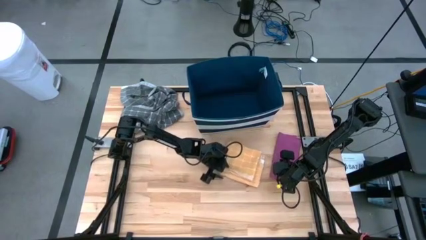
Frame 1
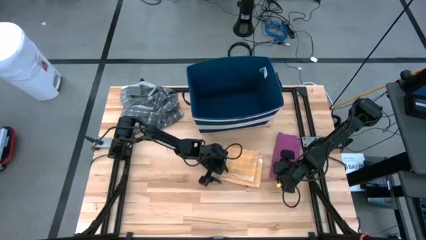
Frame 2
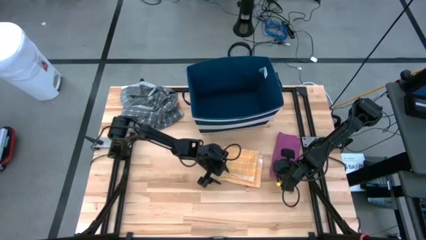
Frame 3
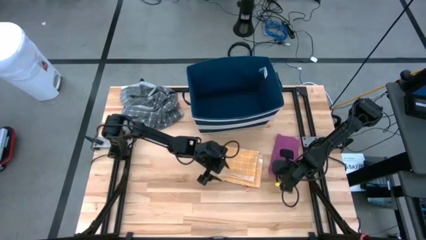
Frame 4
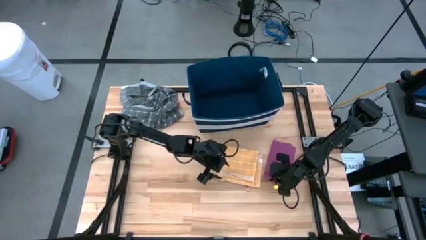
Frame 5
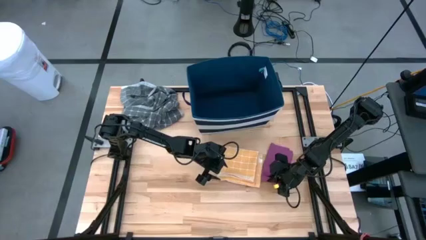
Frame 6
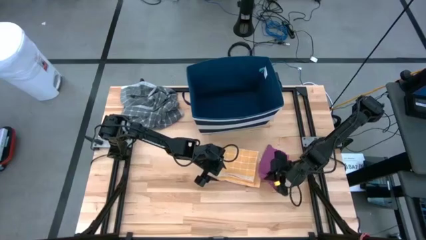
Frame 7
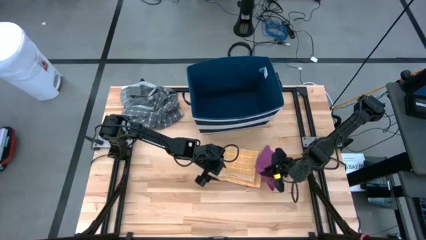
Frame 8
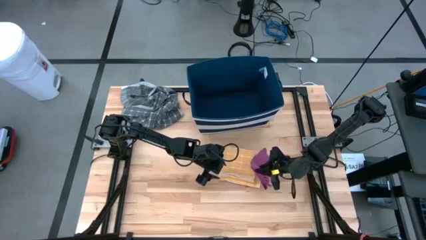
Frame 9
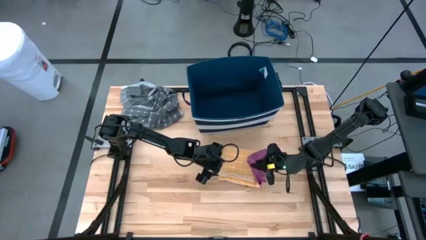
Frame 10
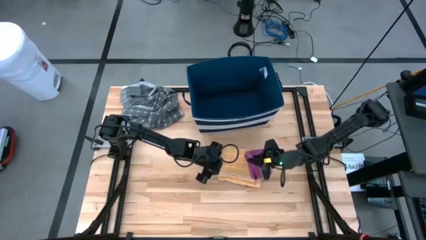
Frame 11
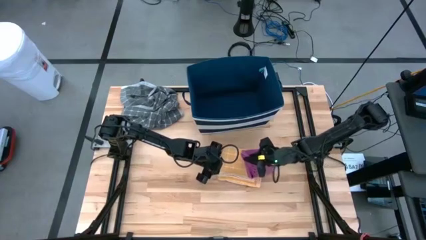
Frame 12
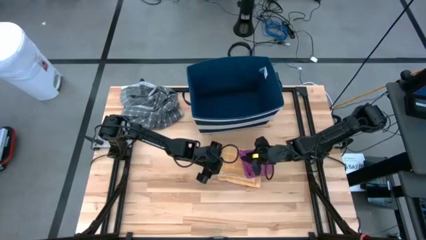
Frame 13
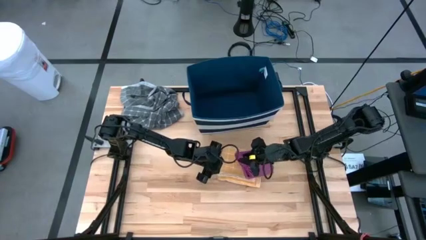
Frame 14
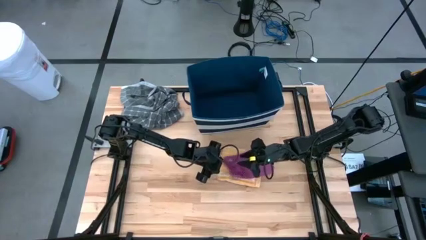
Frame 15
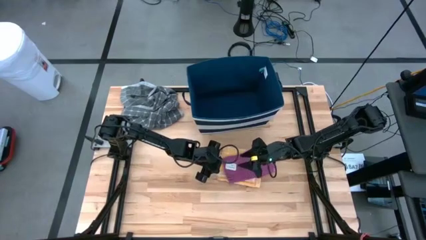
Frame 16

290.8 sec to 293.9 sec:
Task: Fold towel
Stack the purple towel on the yellow towel

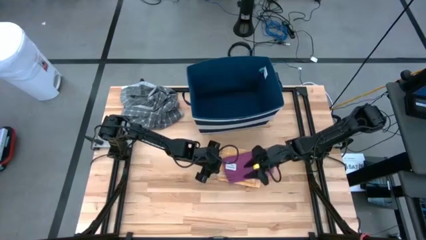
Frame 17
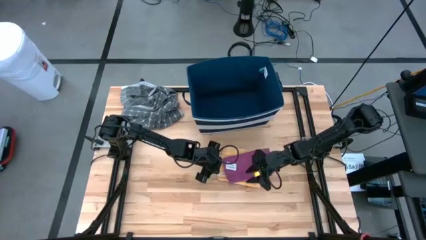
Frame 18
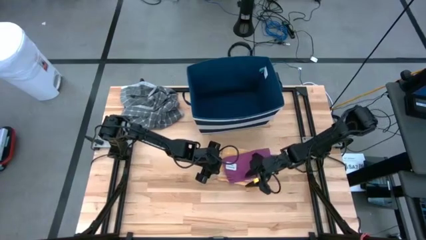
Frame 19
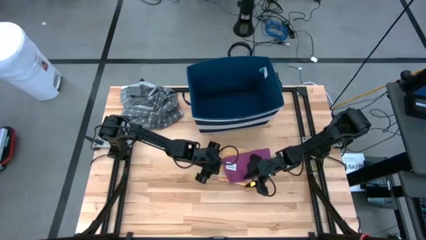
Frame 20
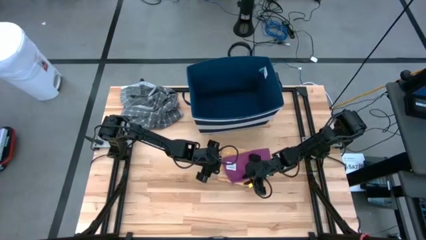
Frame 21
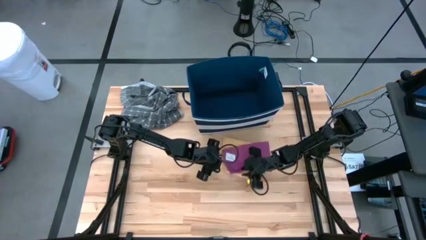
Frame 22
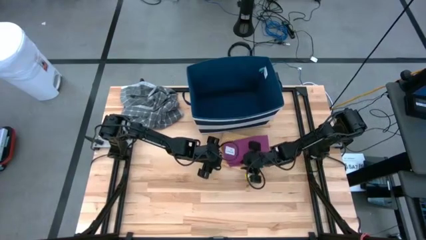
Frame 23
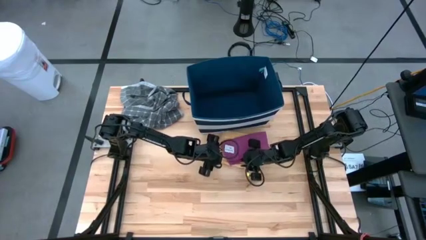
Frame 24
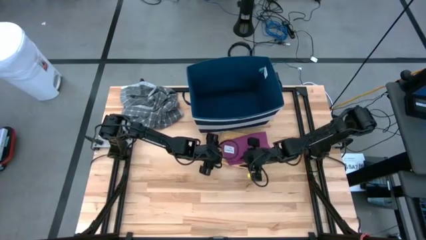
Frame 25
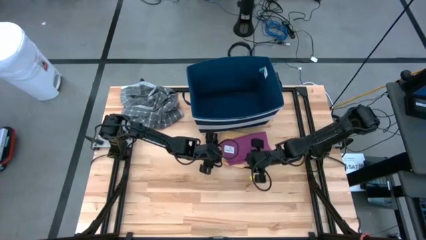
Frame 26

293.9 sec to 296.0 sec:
Move the stacked towels to the top

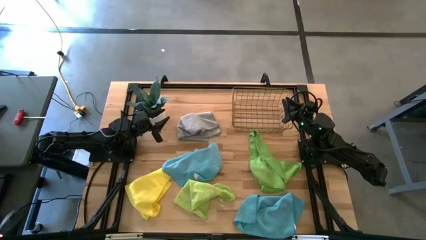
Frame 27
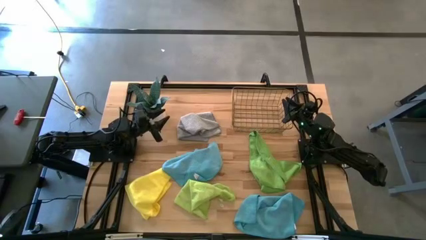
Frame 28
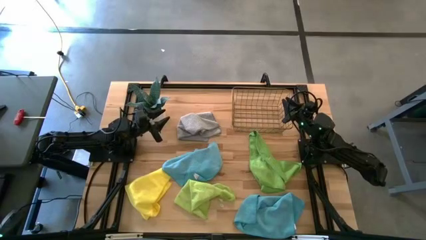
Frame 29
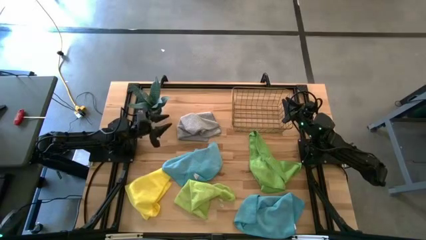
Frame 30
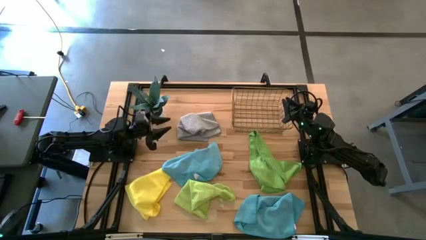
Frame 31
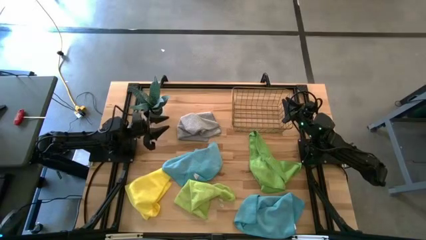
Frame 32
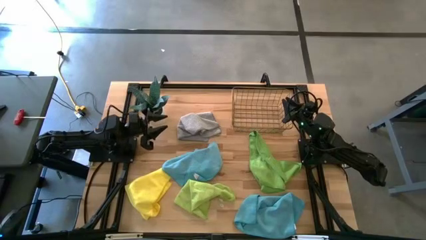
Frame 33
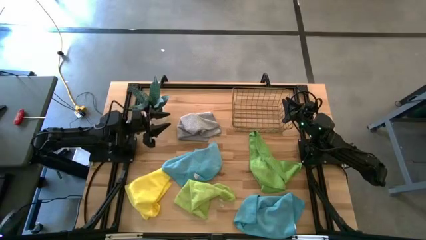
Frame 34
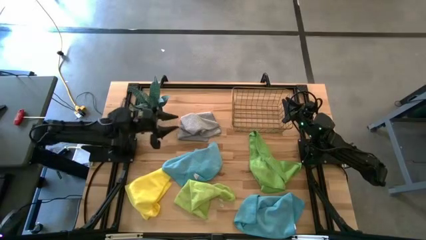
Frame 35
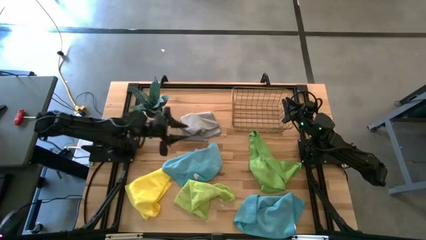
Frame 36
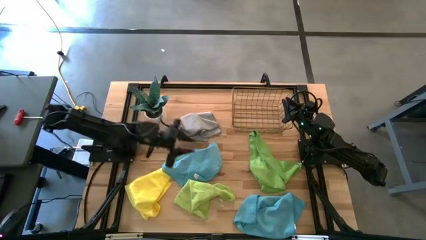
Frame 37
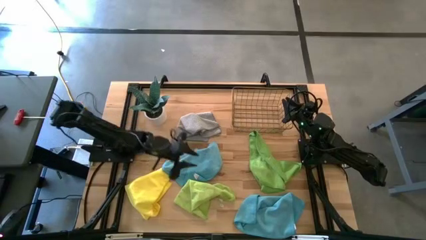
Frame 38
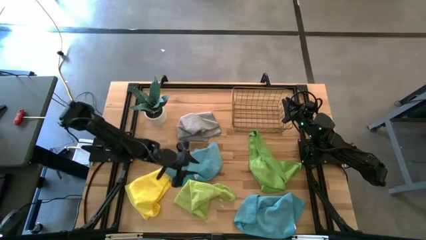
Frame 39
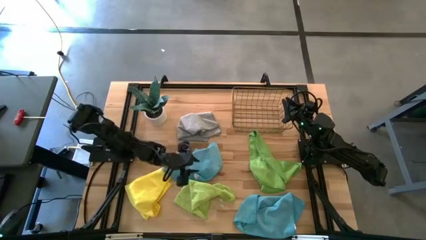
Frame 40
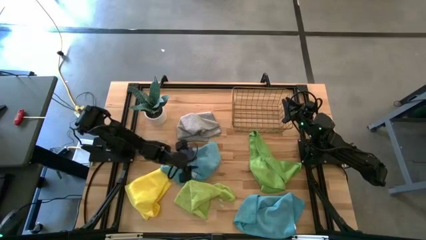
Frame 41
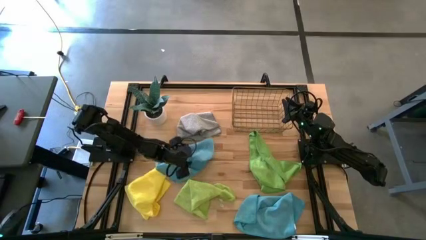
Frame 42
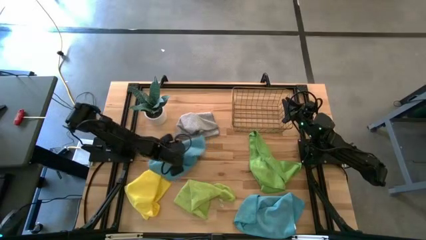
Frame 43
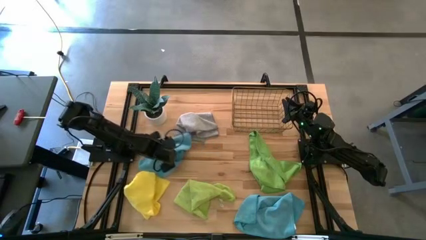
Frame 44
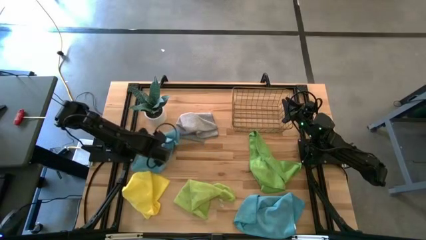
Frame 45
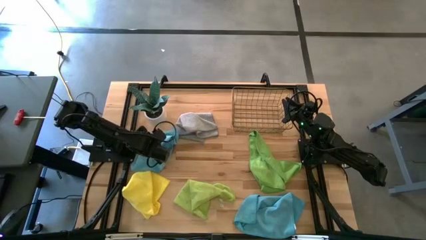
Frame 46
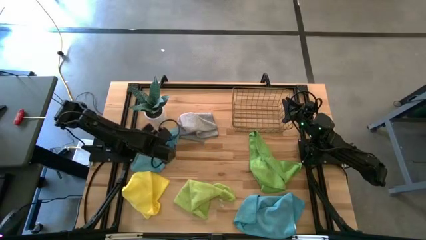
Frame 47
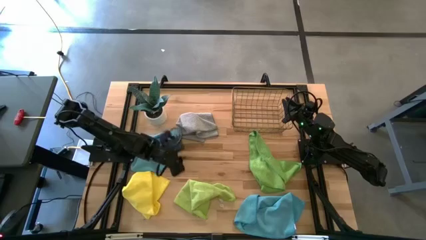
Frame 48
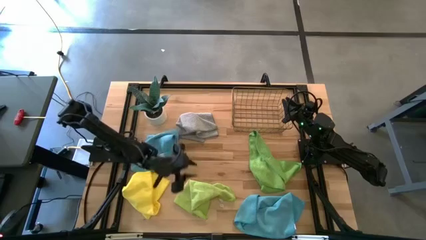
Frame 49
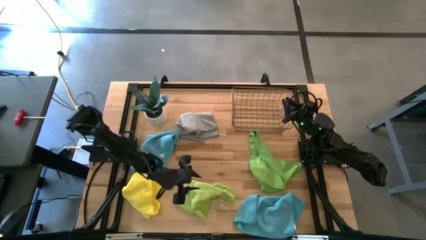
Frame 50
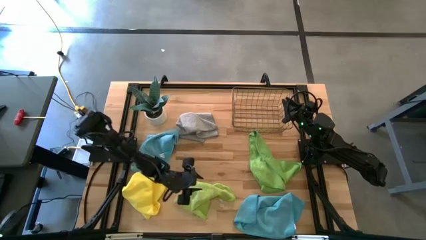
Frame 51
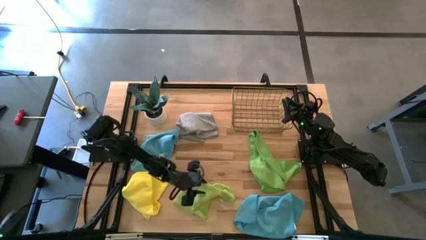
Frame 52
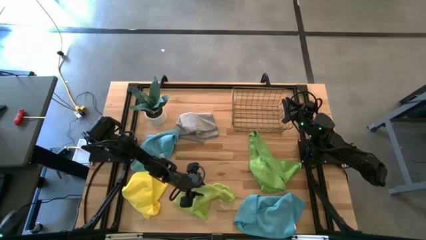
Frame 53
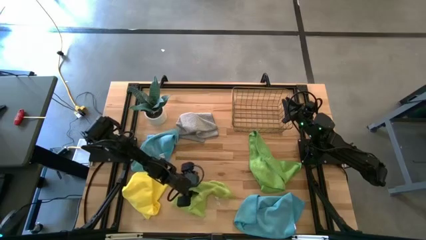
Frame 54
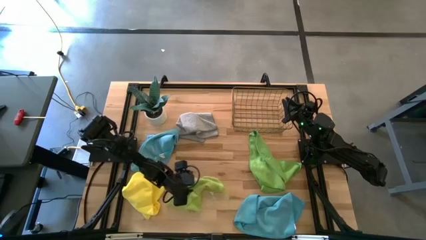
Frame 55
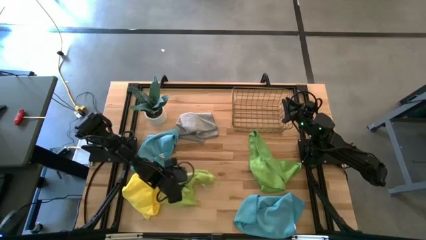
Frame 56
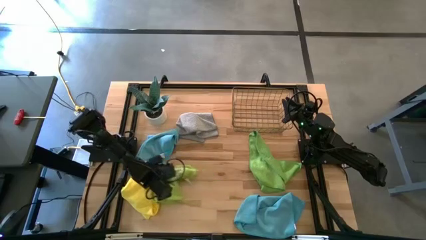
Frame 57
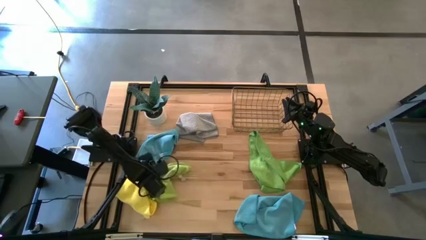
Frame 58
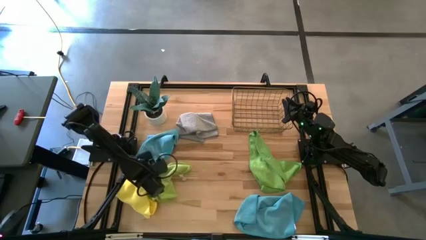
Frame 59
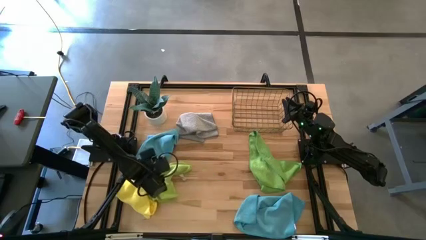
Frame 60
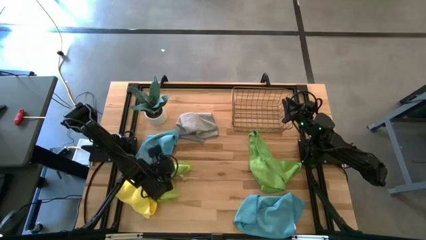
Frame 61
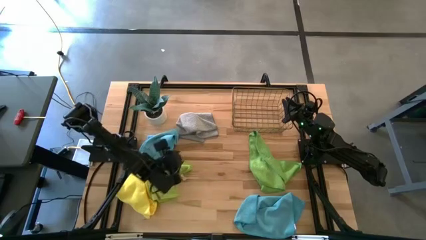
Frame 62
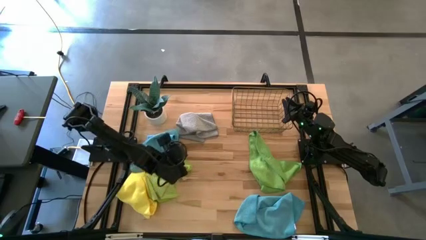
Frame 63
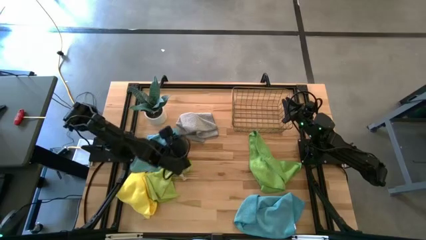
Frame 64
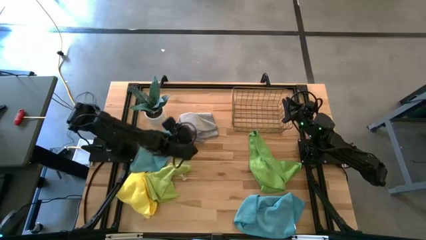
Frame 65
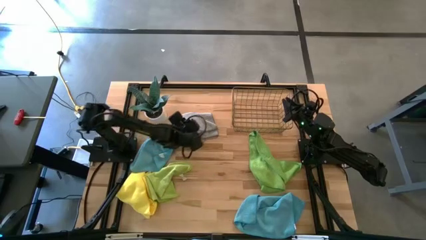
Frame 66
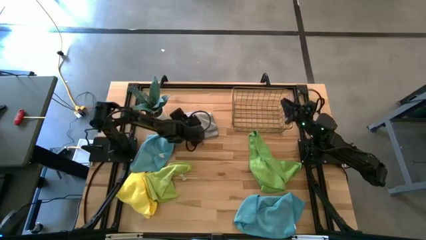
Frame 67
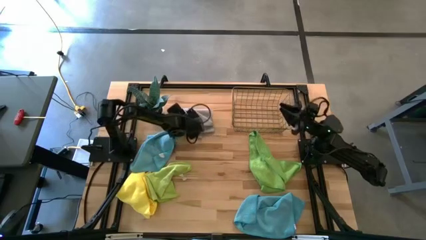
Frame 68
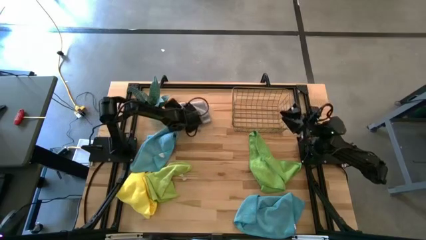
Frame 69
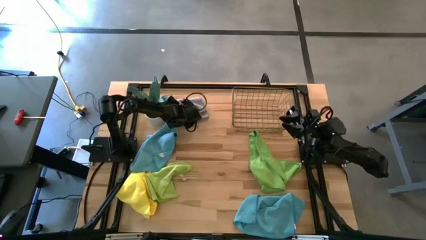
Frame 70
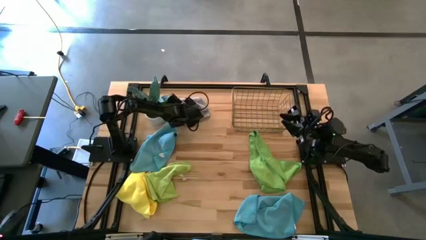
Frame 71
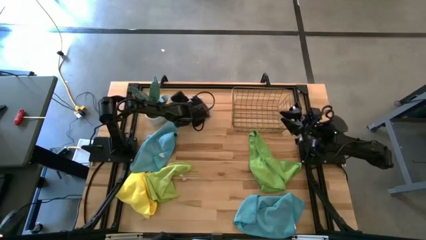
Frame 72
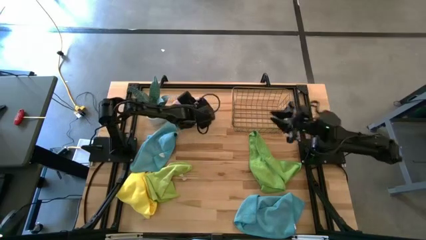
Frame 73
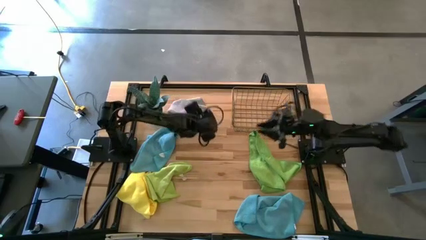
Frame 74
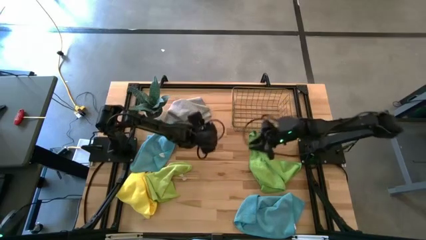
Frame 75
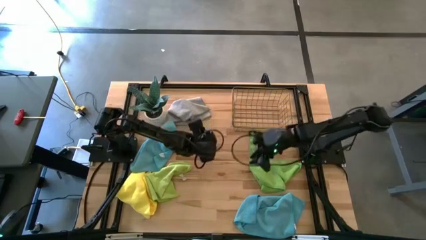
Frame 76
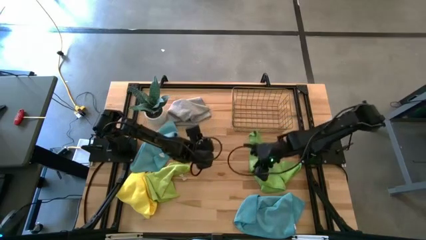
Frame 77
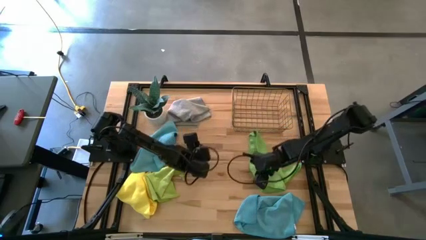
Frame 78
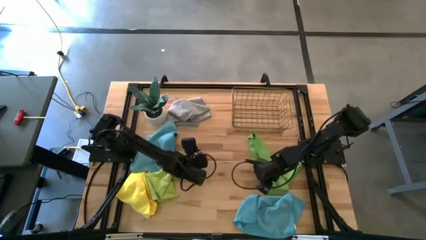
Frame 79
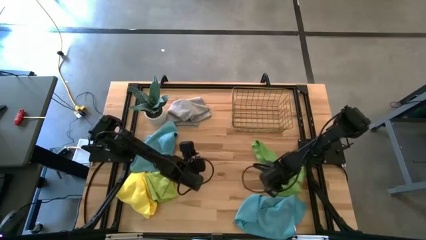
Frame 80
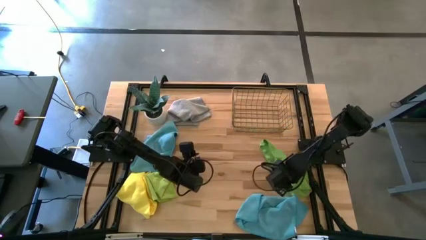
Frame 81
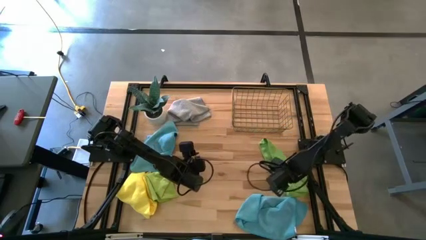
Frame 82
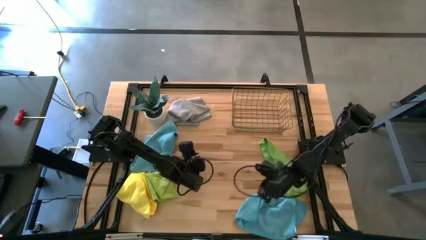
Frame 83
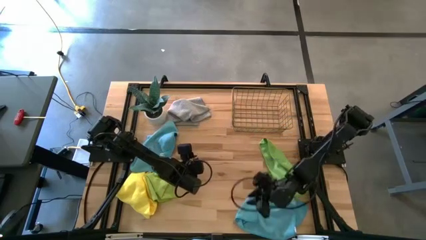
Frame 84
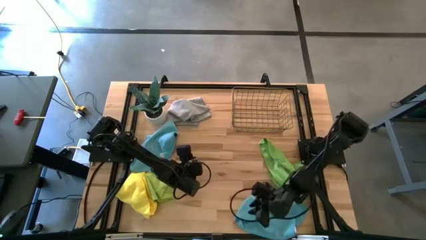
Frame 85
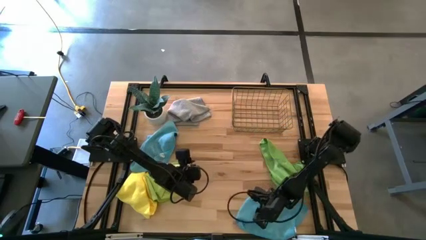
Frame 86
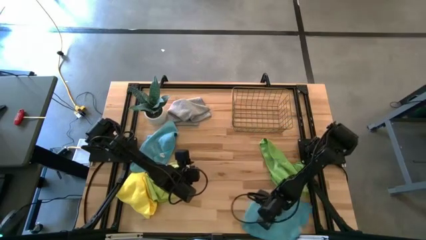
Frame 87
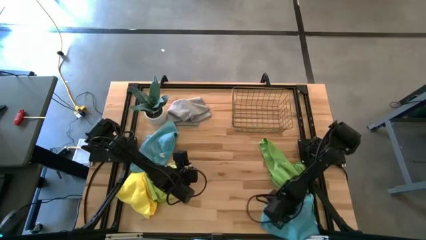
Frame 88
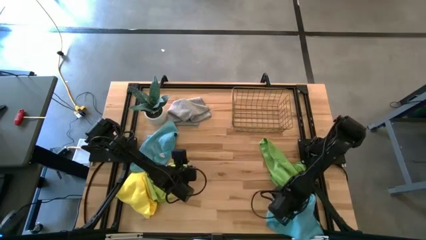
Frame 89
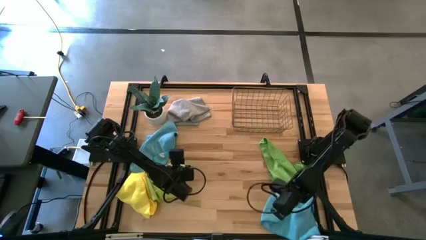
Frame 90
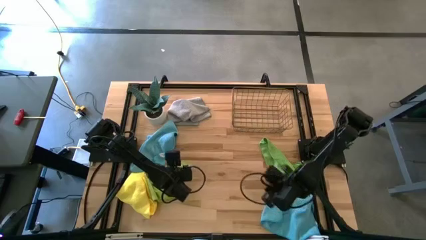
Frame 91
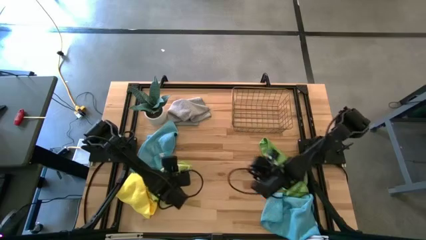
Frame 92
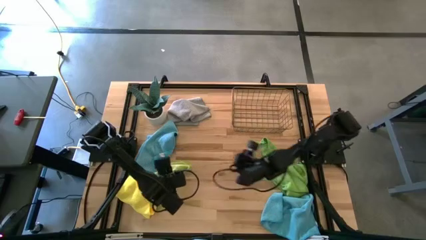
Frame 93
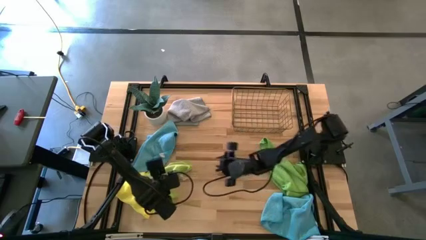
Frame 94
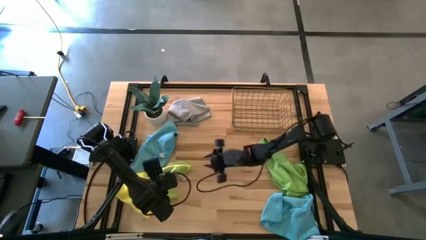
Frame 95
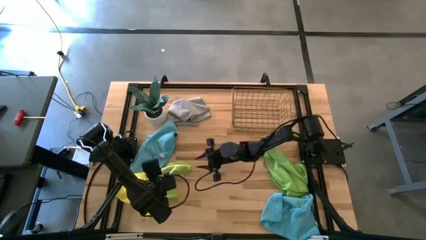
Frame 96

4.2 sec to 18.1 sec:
Task: Fold microfiber towels
Fold the light green microfiber towel
